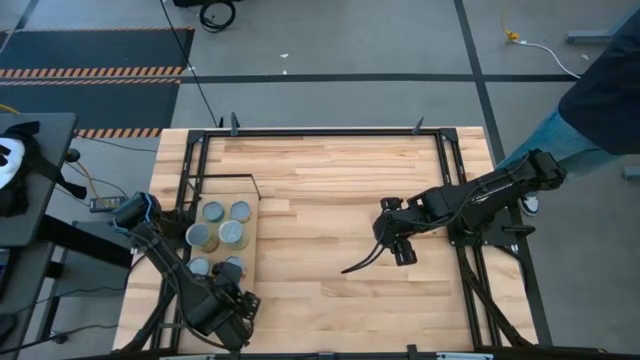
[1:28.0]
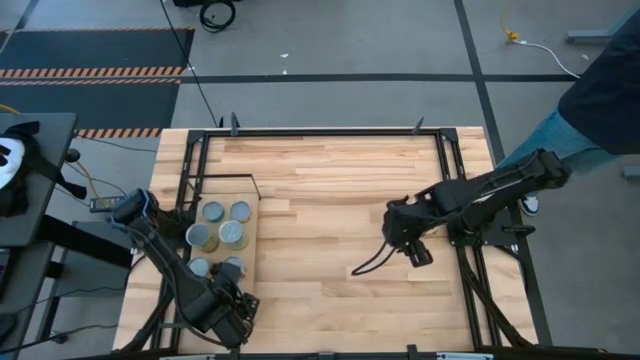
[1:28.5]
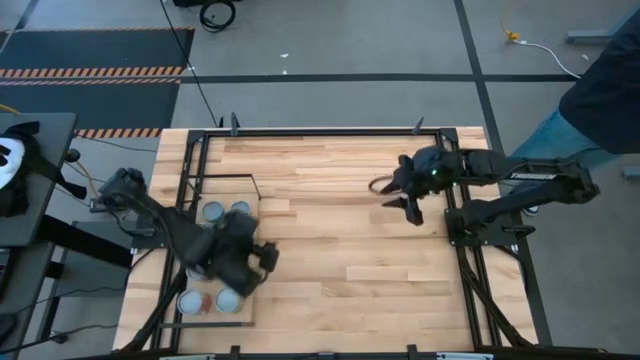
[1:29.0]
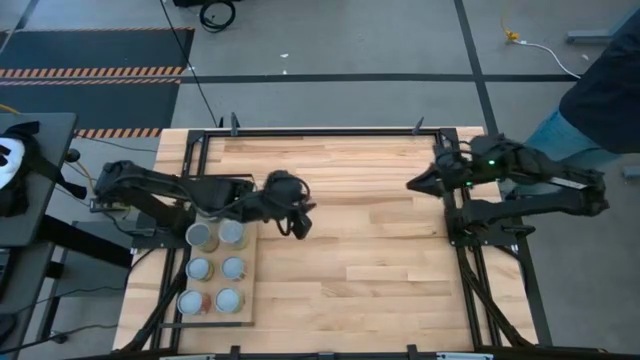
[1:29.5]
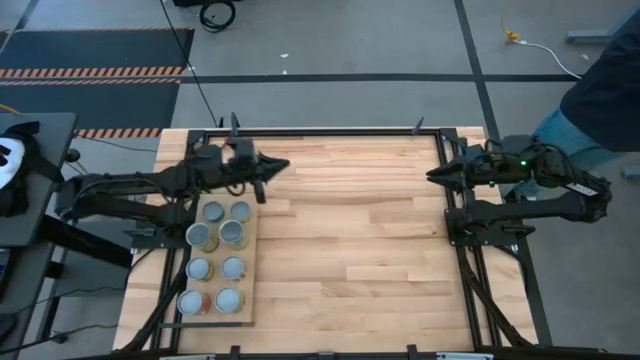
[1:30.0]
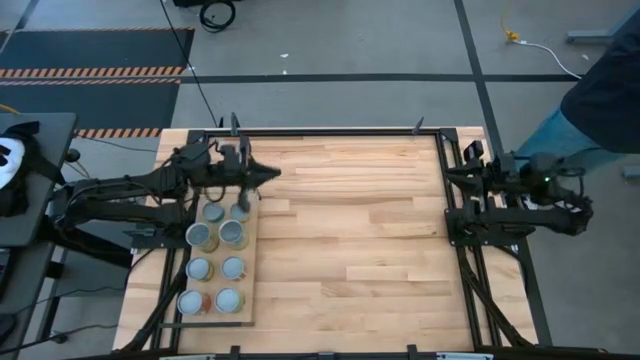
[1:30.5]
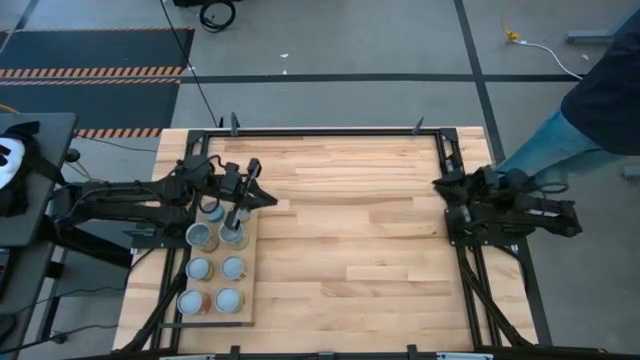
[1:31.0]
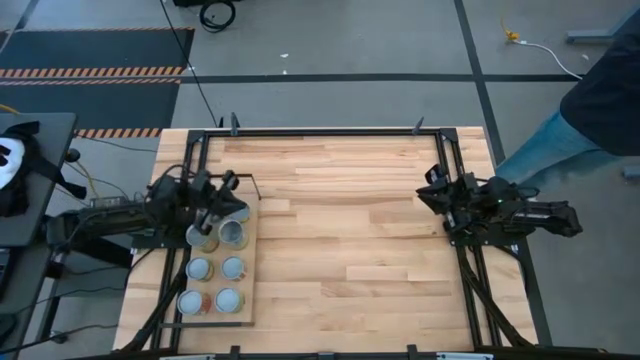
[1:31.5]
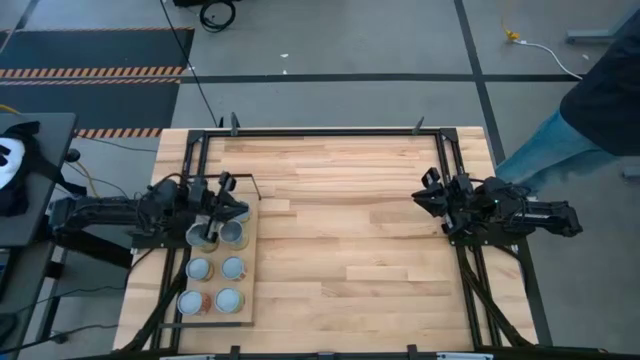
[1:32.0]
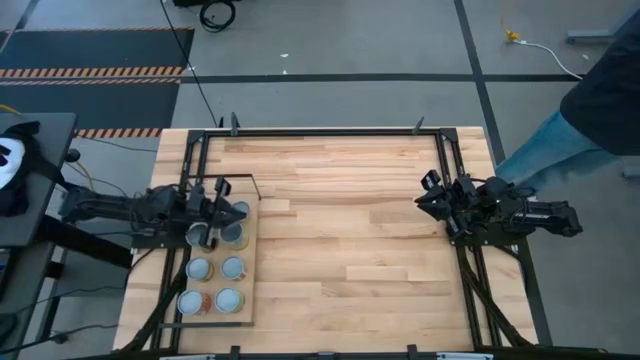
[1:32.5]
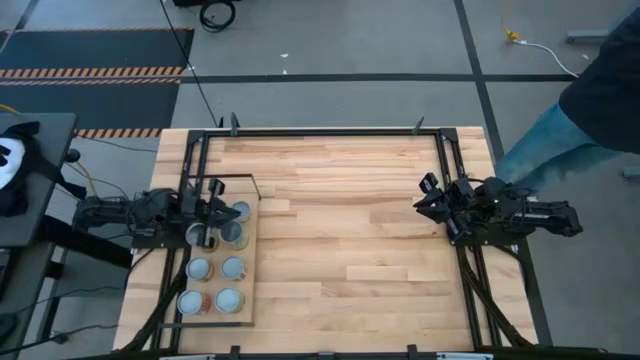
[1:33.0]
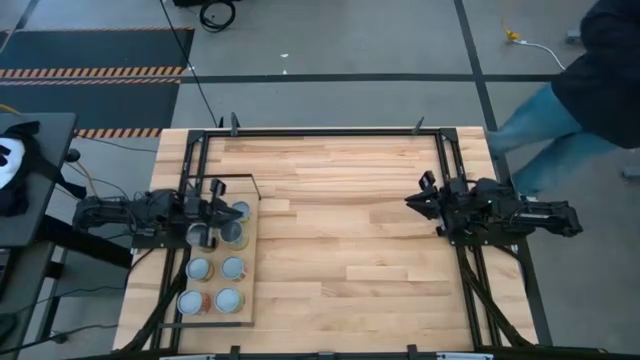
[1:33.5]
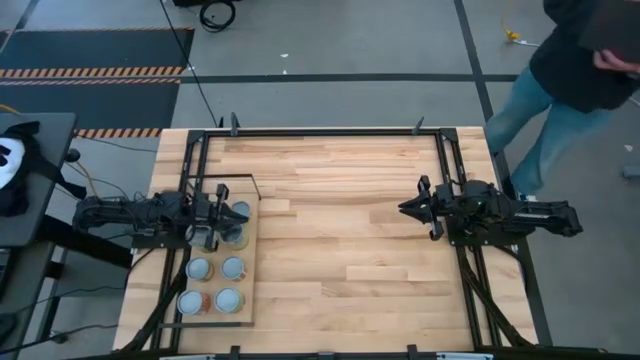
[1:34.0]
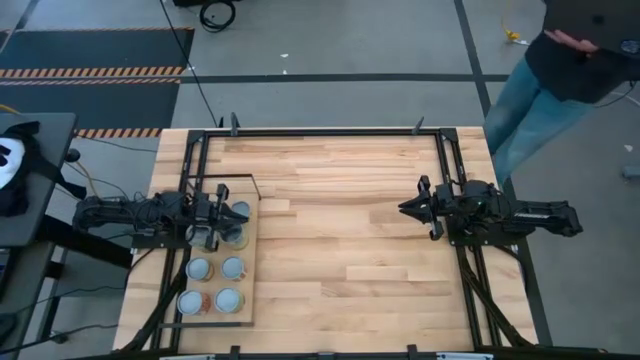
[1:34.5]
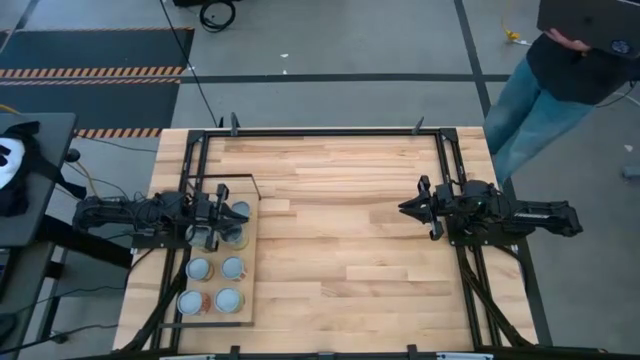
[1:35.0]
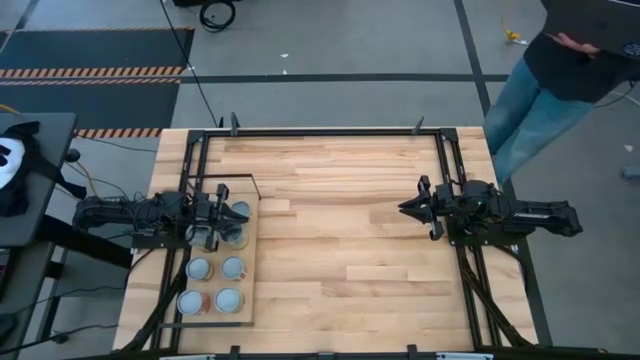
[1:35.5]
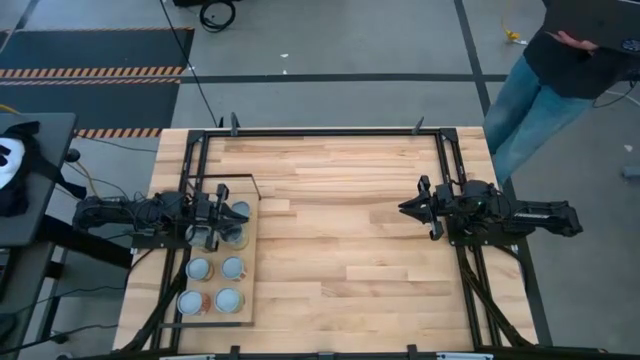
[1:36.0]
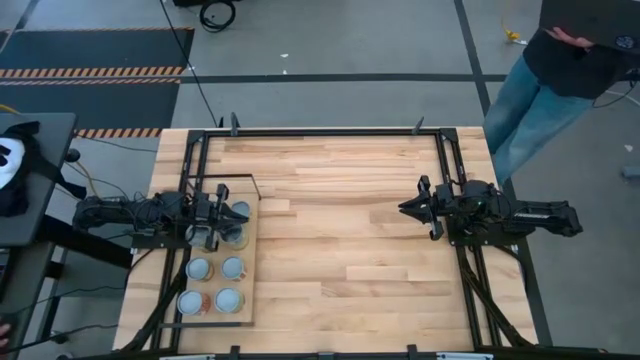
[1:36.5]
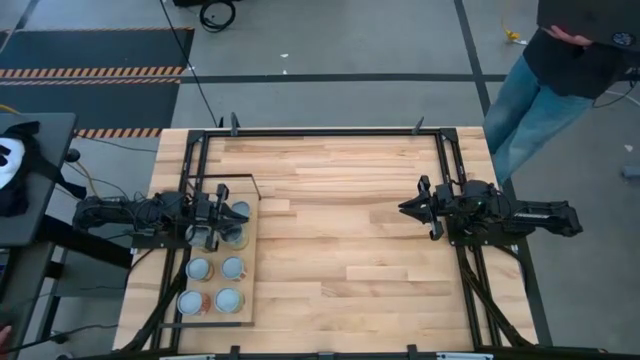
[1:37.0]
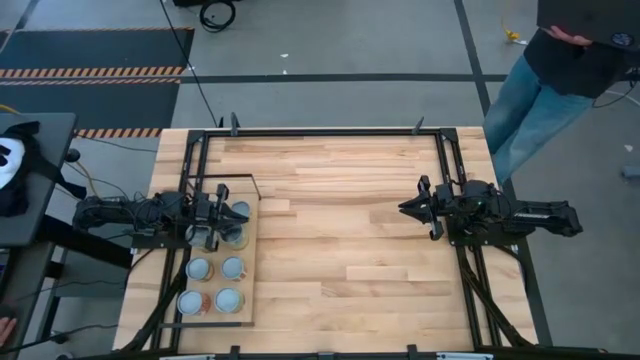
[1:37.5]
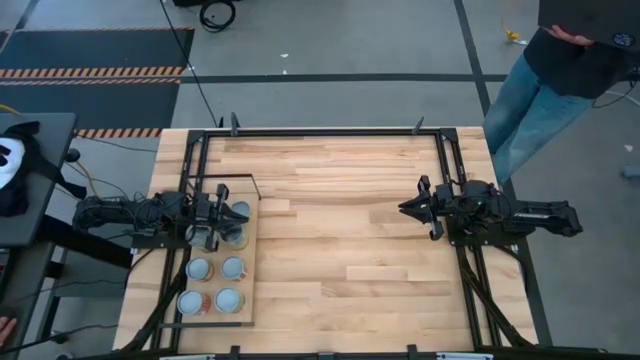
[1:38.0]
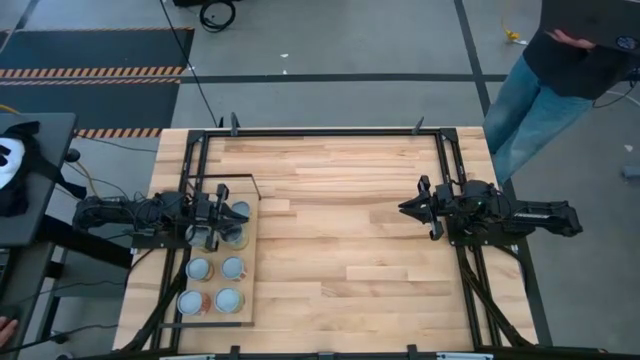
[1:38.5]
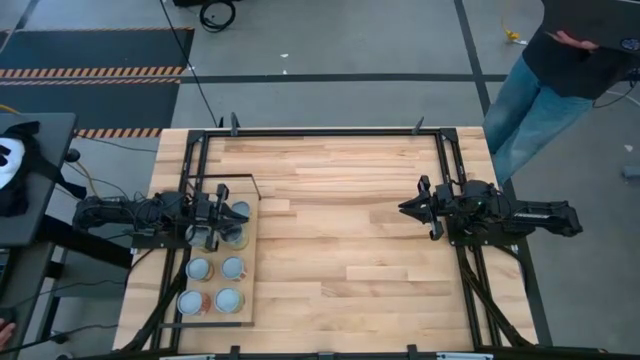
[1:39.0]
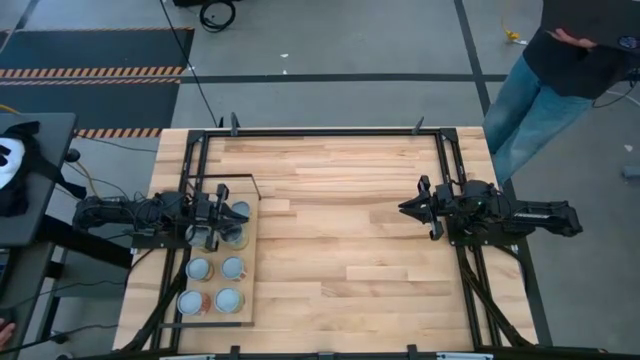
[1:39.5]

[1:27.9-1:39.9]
Task: Pick and place cans onto a shelf
Return to Home Position

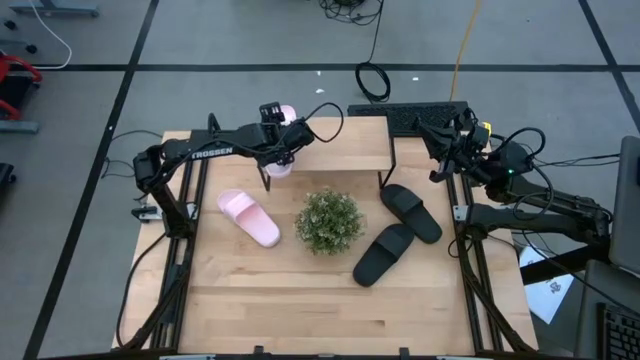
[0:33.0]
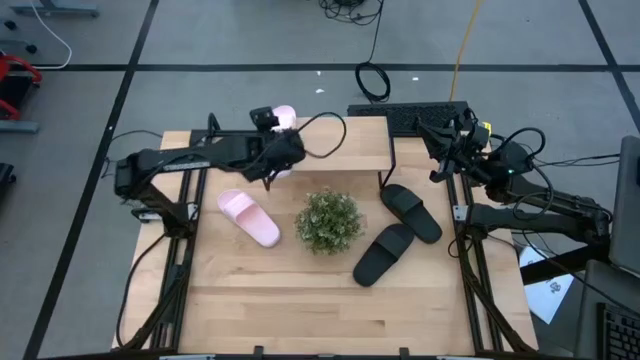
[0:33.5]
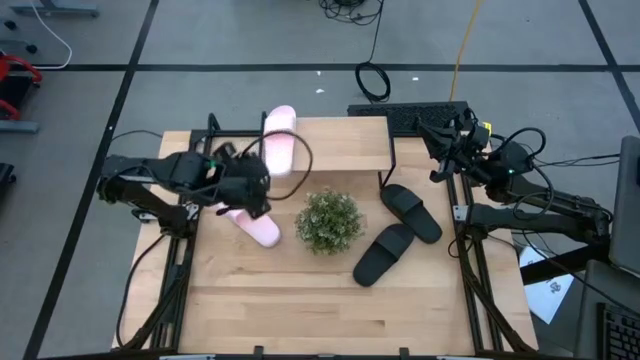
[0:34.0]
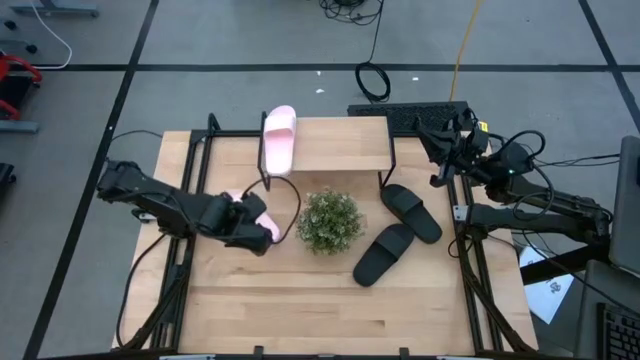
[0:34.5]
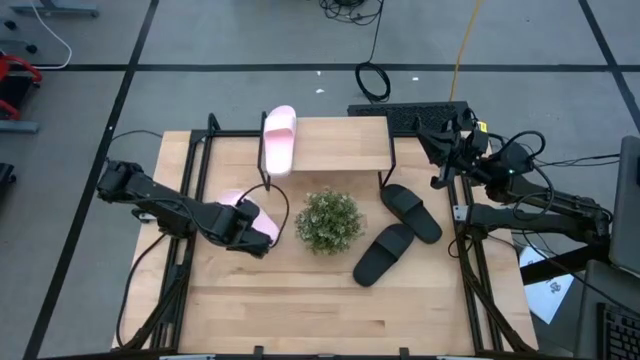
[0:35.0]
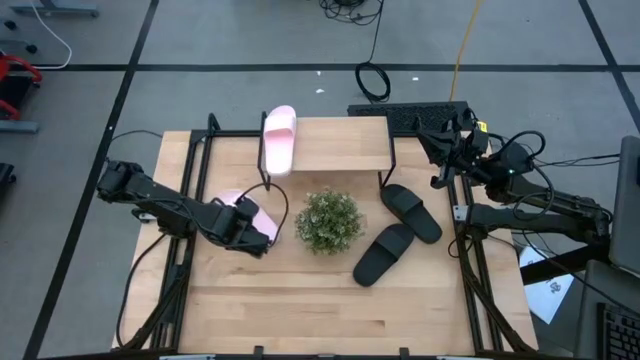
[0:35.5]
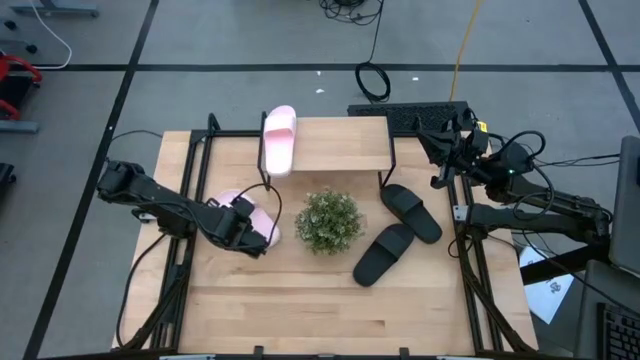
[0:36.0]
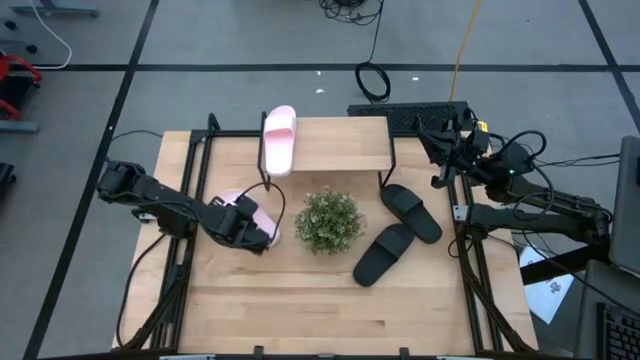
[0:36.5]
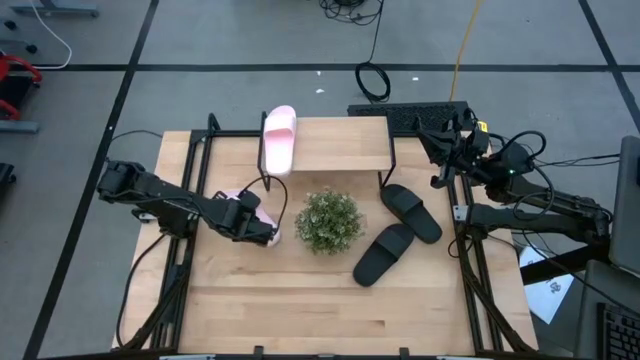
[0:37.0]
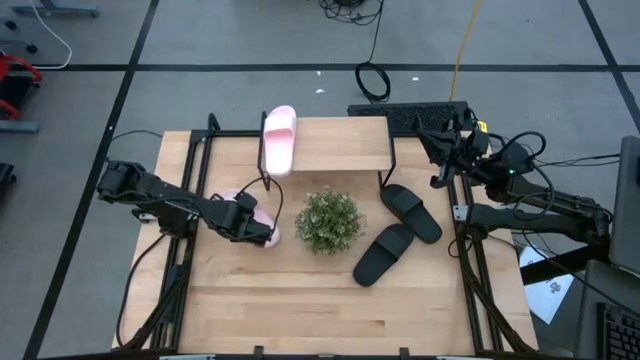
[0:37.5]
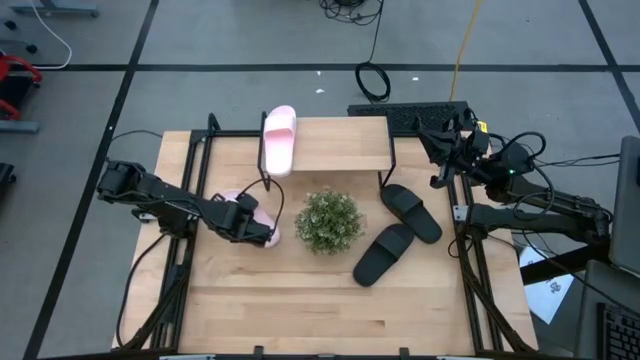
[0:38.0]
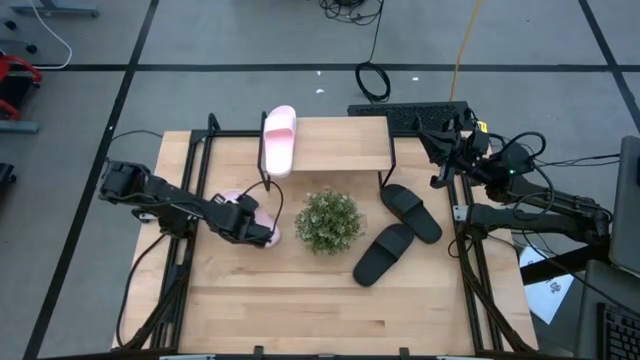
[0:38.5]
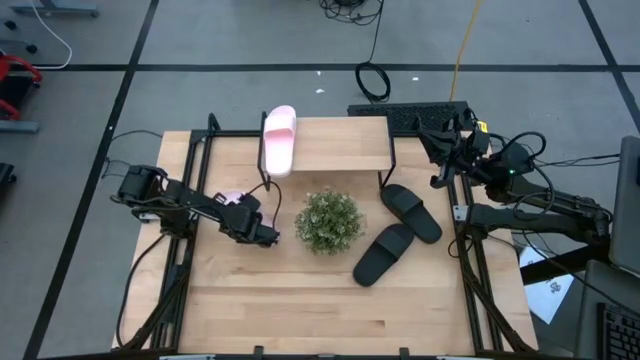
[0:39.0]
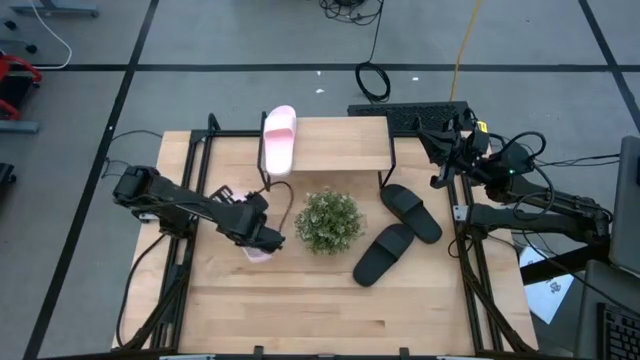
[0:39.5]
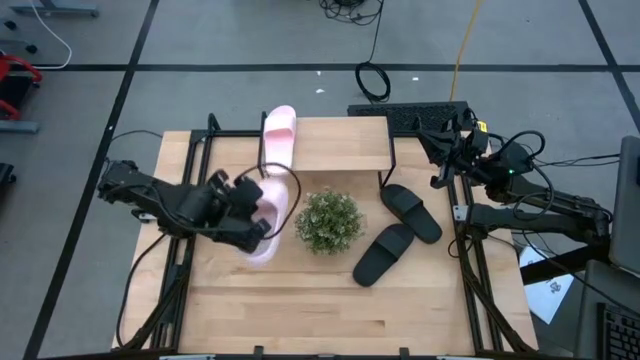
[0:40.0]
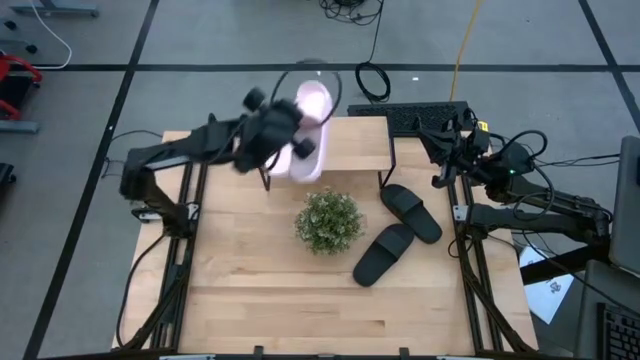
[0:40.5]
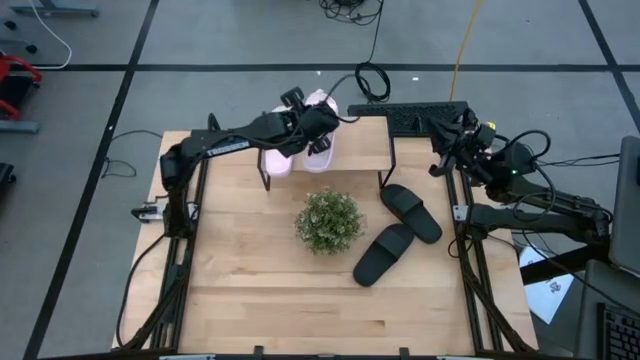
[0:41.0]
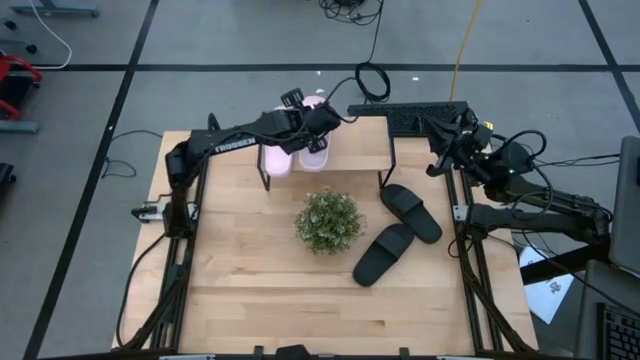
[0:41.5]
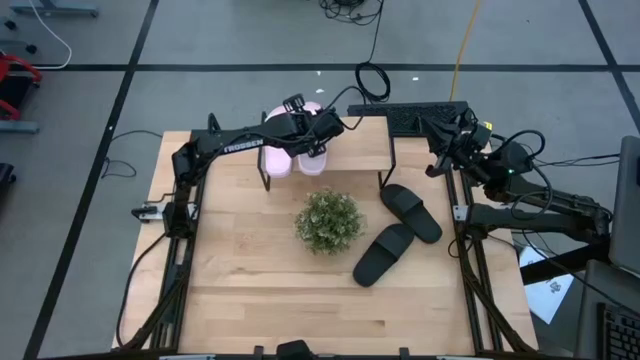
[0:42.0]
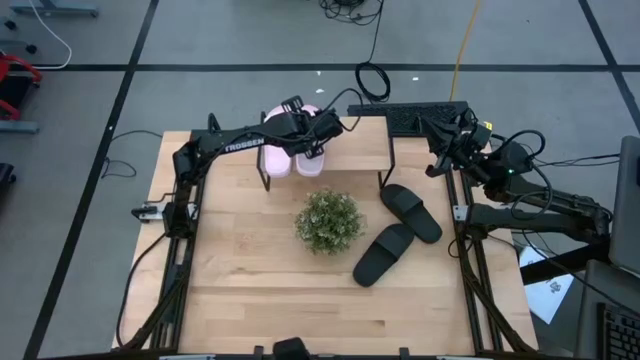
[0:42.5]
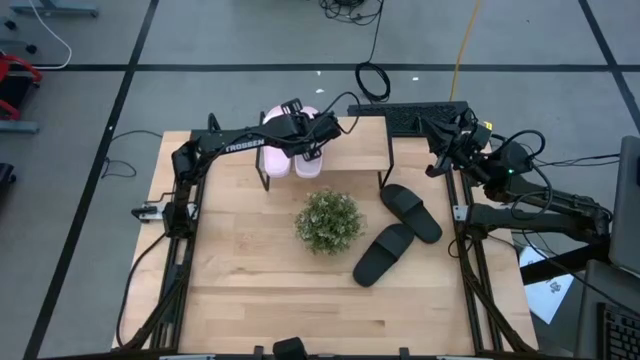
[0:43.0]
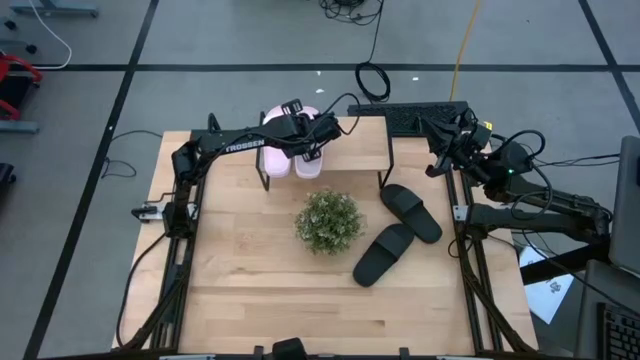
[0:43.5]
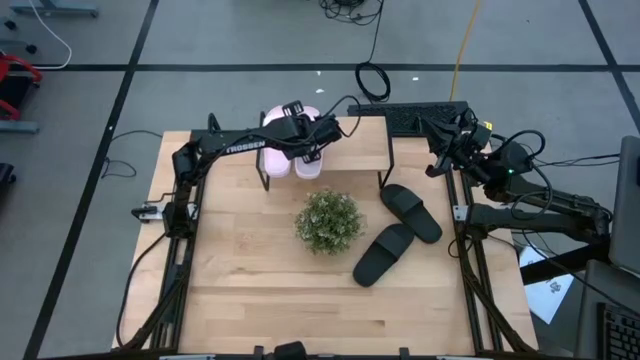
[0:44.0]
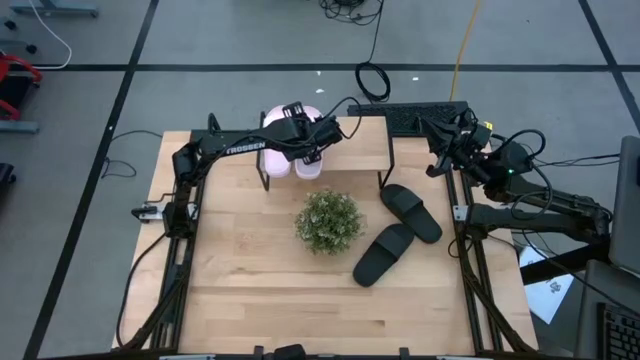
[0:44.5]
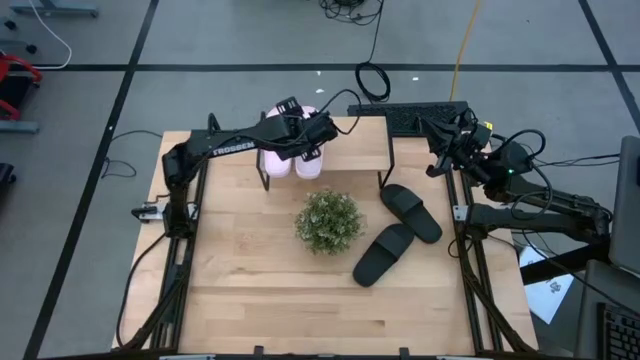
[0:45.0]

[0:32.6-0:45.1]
Task: Pick and place slides into the shelf
Put the pink slipper on the shelf
